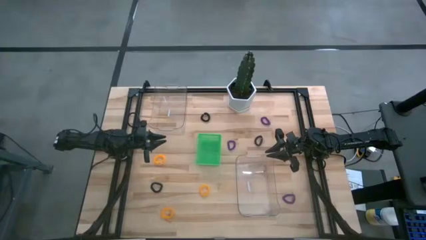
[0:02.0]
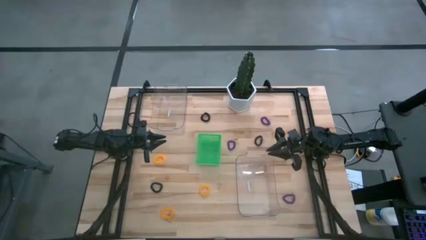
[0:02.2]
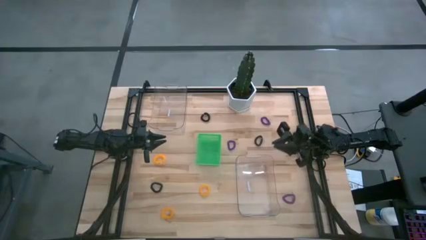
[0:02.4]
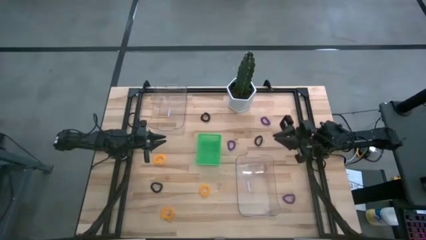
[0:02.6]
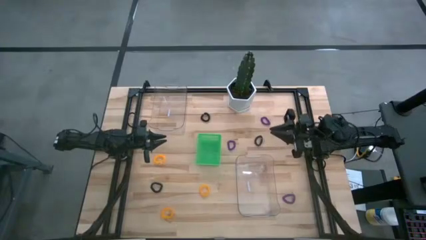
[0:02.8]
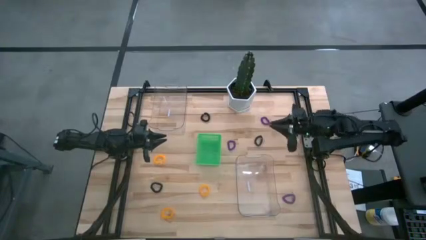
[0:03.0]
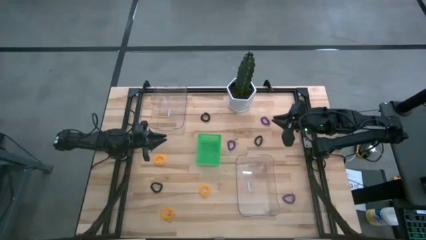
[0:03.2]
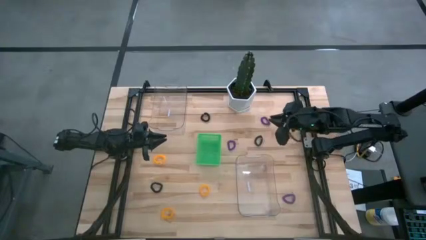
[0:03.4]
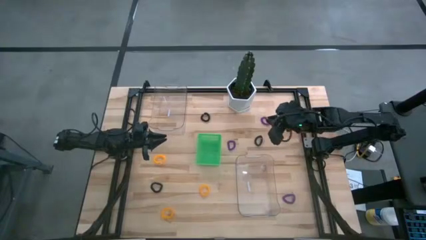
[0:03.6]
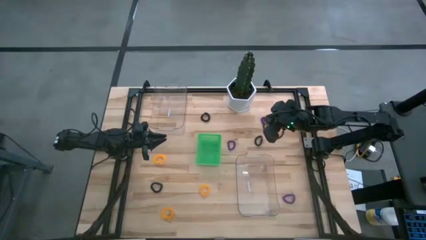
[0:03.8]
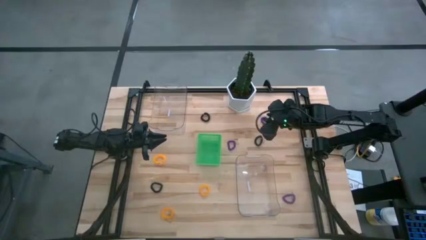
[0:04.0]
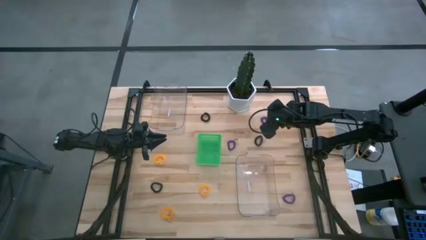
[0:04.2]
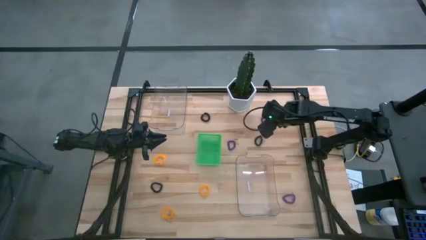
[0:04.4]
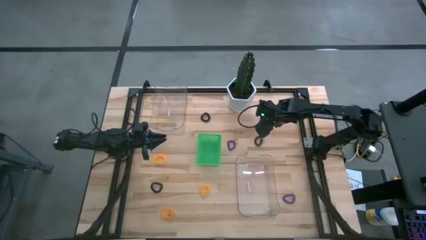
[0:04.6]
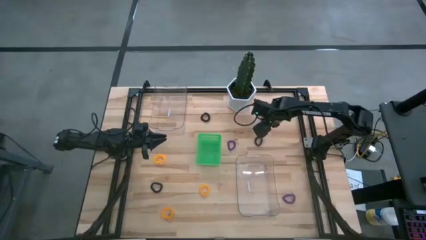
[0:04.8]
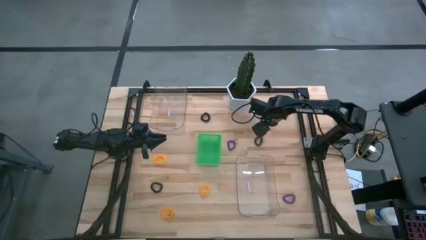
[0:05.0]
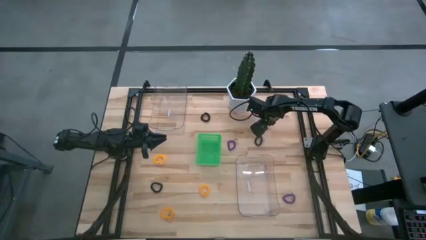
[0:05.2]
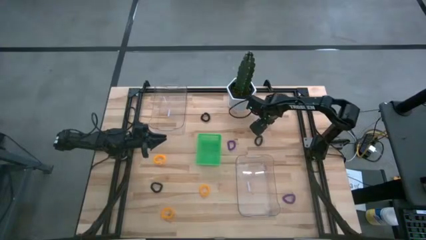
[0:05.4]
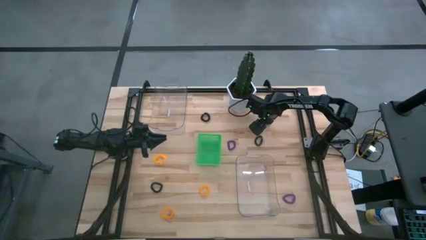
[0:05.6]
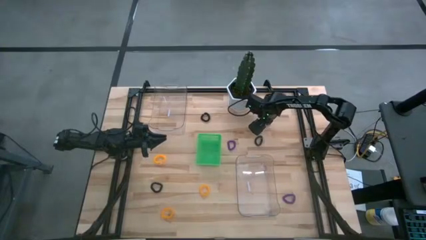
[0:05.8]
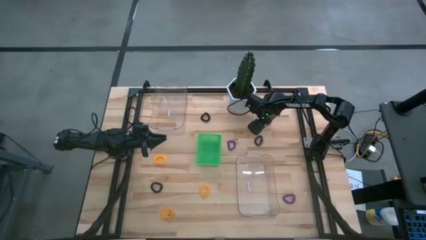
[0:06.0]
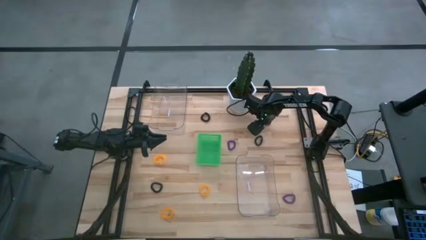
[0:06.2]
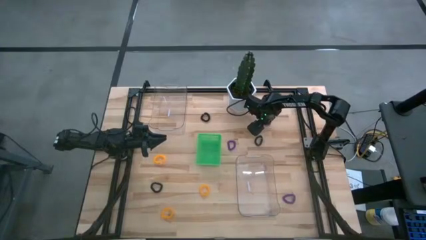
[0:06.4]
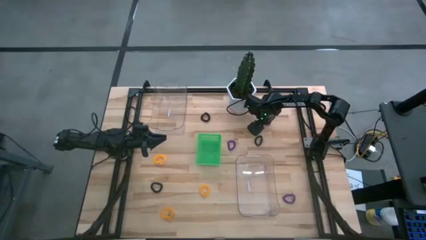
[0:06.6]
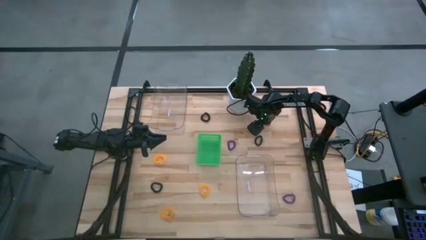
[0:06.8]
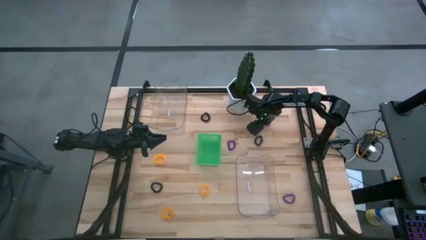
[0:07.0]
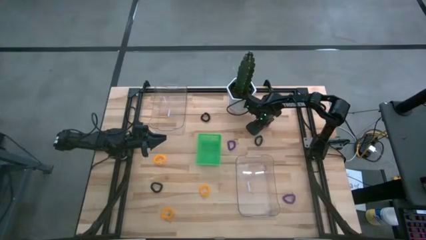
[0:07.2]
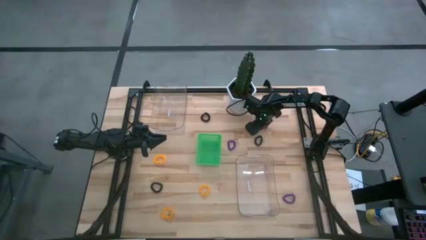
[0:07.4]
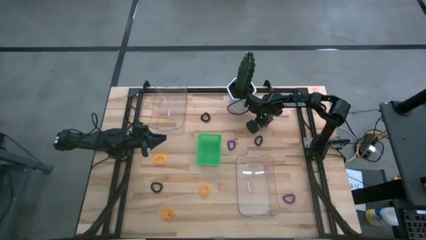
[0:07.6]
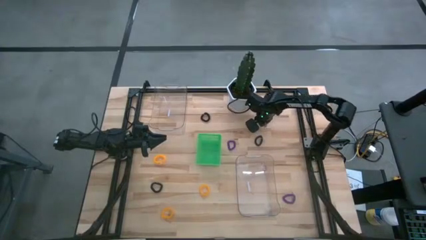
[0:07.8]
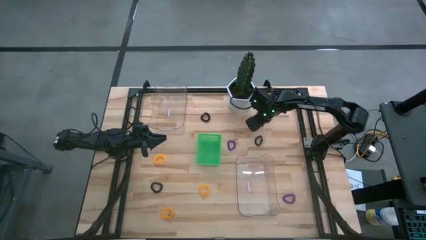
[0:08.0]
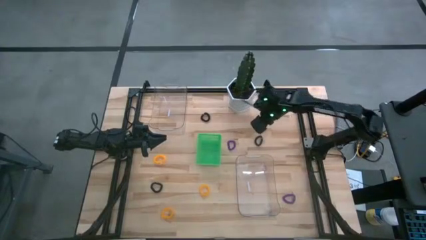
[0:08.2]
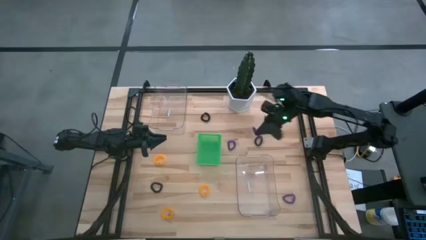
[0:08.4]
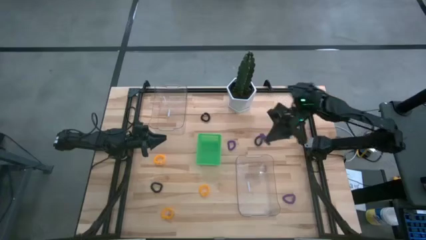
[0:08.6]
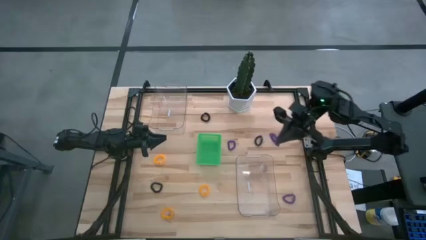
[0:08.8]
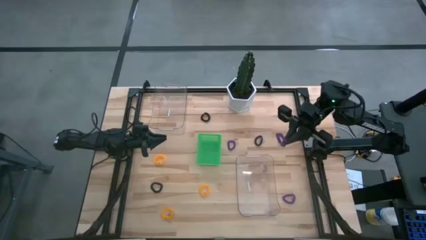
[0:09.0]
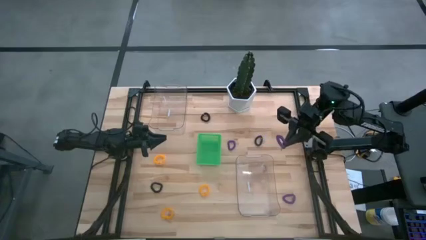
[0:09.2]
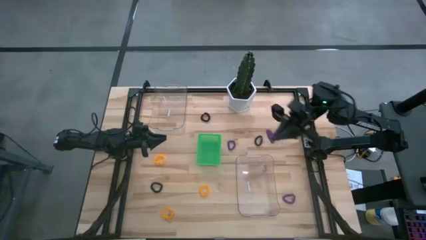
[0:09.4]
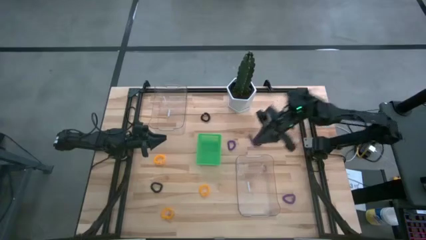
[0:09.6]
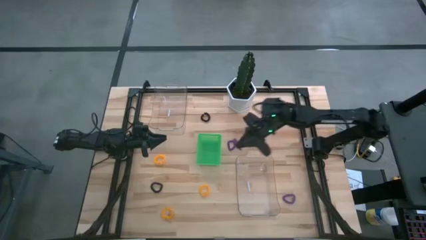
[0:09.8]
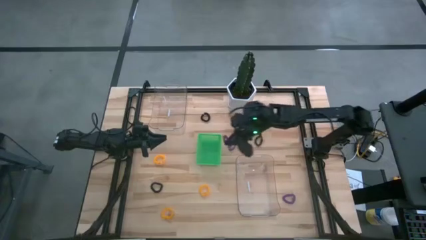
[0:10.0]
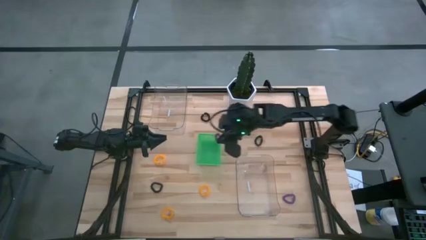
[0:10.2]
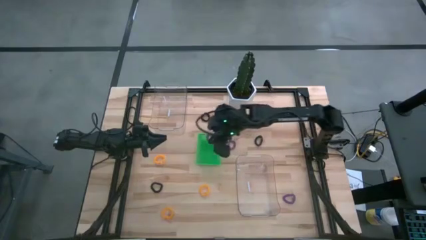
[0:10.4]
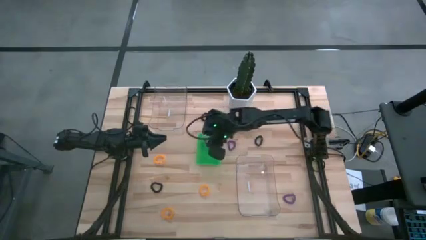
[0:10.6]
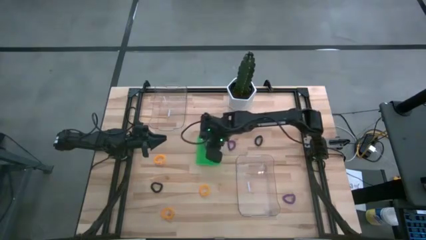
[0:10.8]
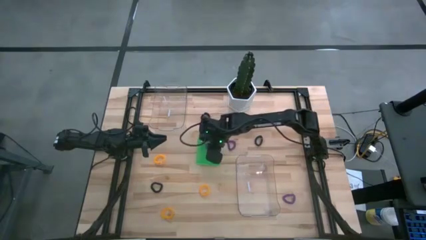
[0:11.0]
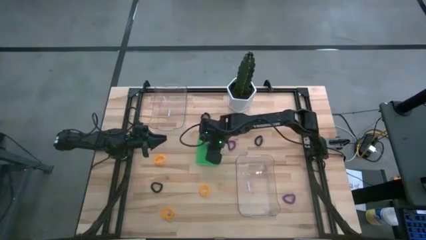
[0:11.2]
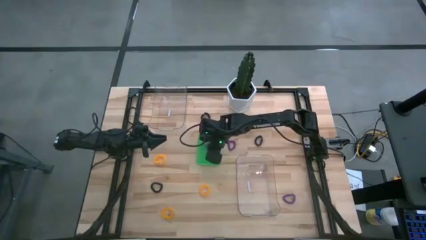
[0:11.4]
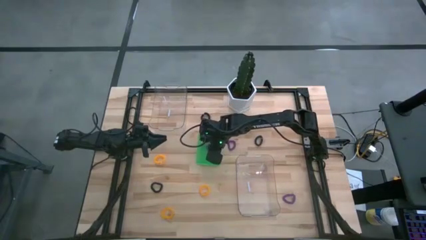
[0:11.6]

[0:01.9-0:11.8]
Task: Sort spring keychains
Put the top purple spring keychain into the green bin

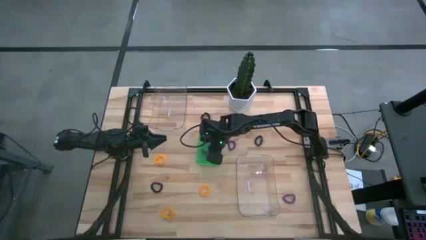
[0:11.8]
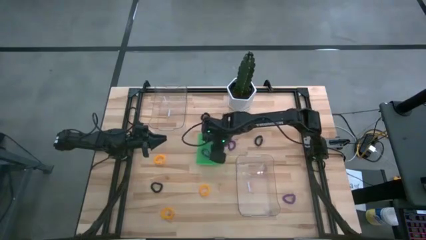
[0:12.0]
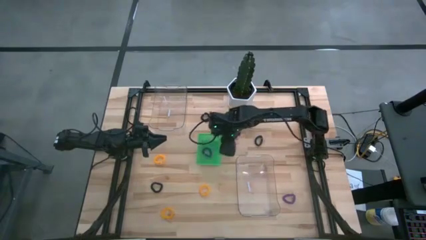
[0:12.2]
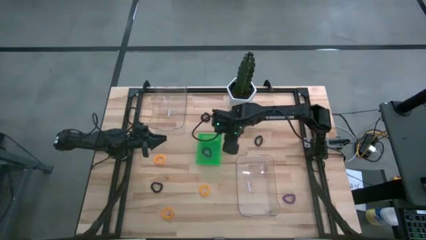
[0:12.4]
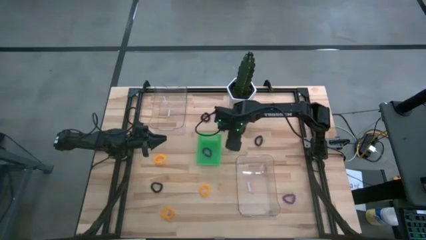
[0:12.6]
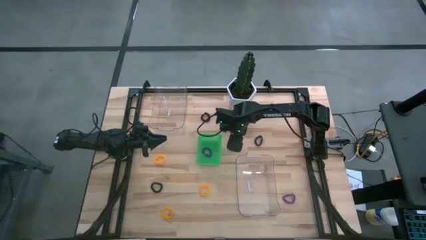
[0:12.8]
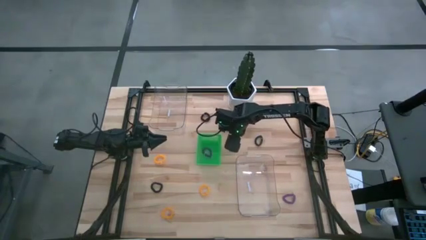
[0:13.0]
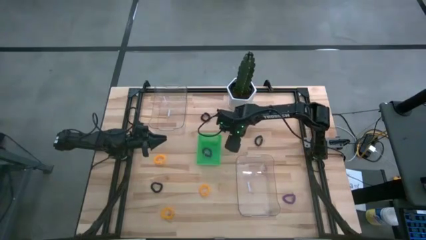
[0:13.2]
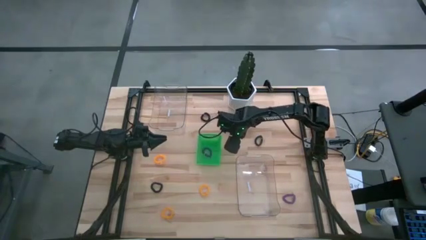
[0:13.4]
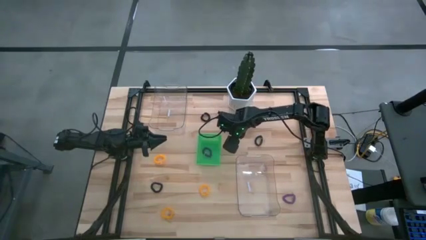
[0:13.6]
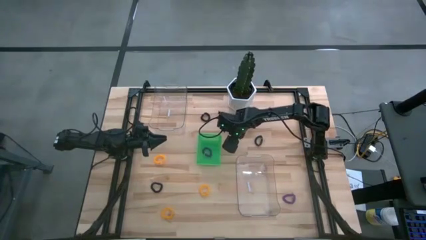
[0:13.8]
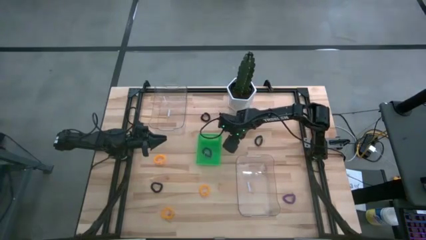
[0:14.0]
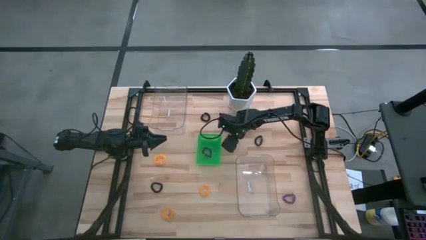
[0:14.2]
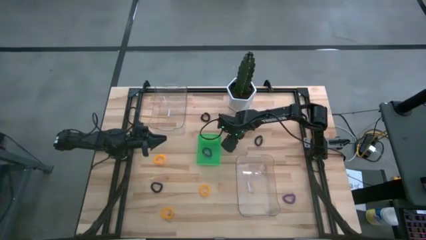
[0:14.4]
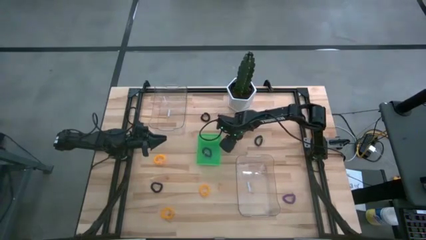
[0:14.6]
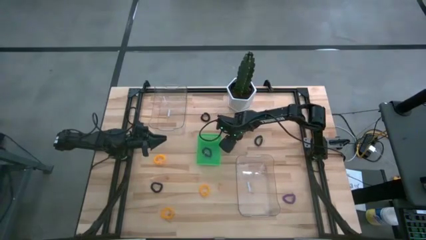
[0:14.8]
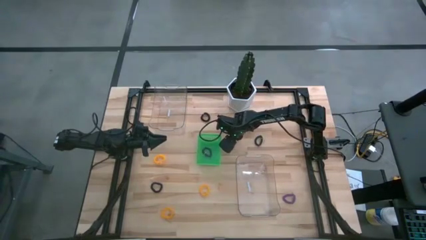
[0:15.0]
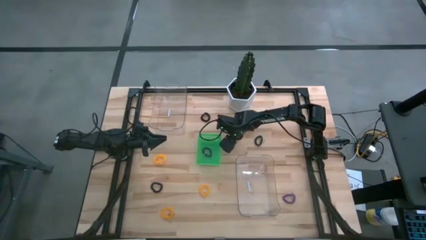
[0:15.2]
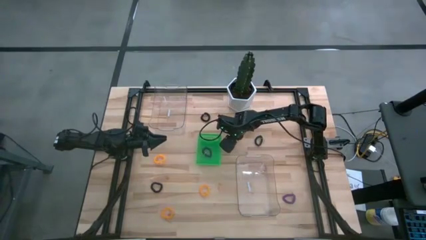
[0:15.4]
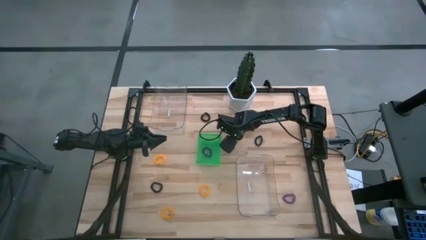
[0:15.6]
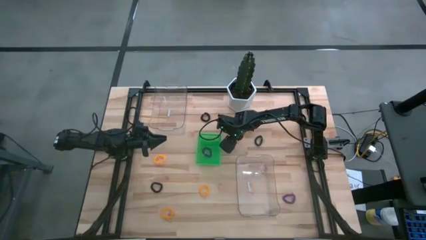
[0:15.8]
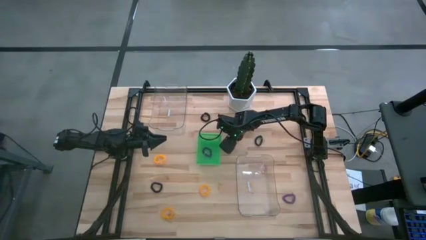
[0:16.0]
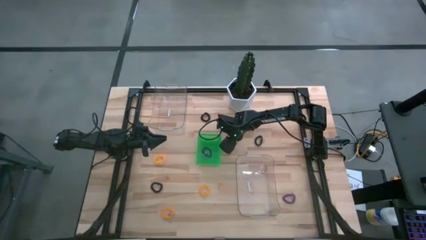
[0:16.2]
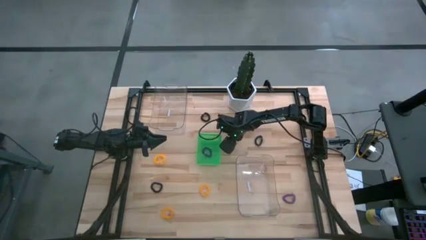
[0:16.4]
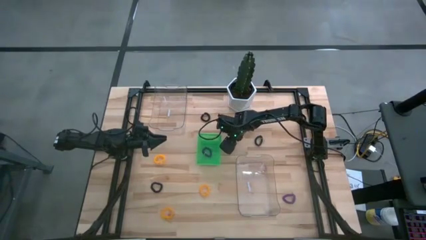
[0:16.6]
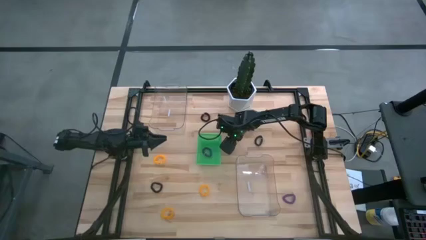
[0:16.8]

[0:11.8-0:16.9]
Put the top purple spring keychain into the green bin
